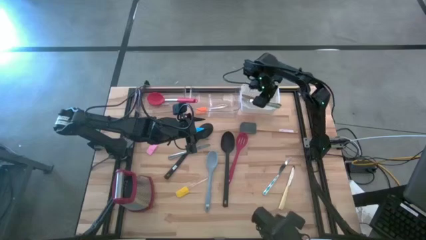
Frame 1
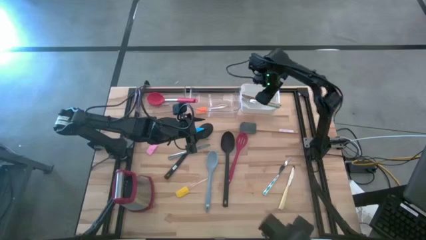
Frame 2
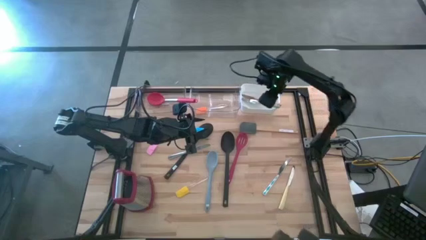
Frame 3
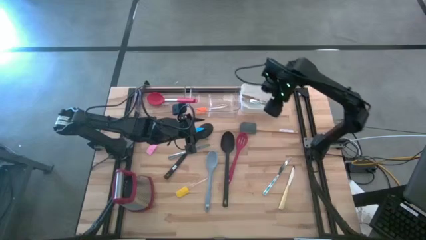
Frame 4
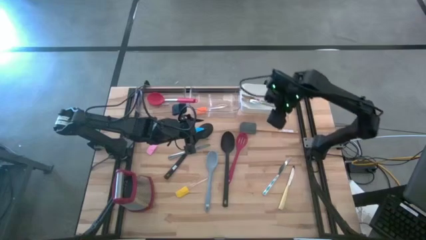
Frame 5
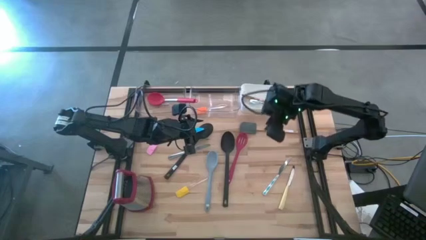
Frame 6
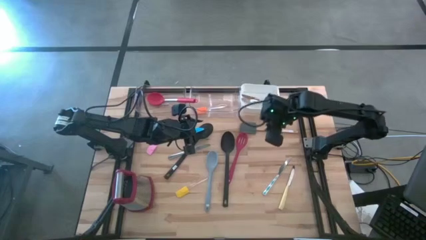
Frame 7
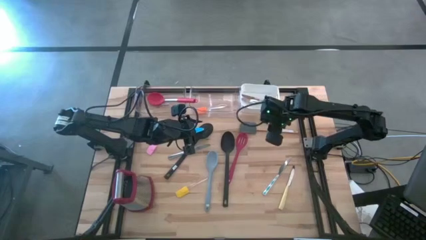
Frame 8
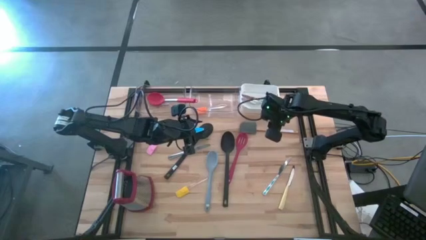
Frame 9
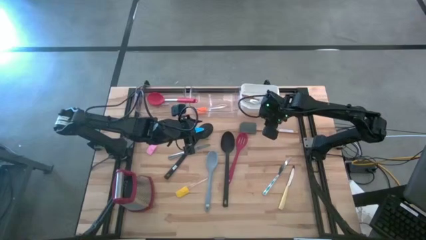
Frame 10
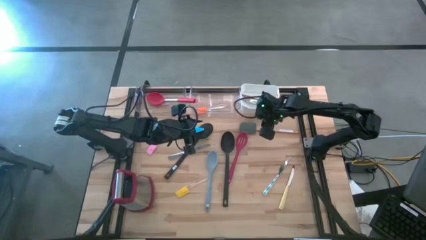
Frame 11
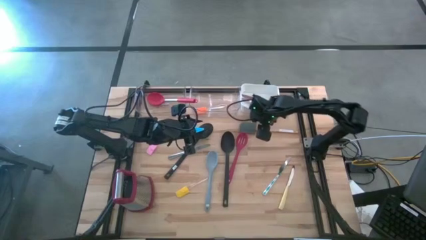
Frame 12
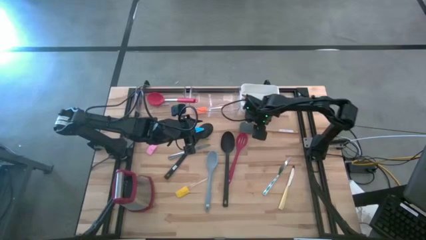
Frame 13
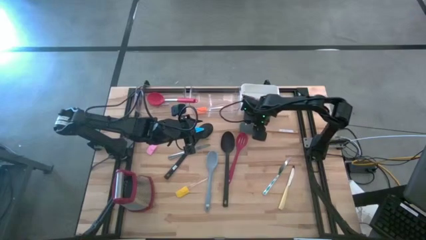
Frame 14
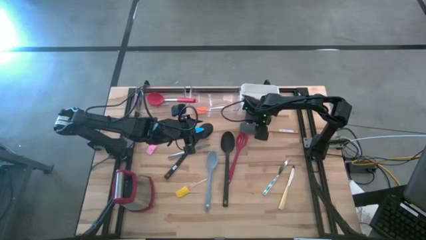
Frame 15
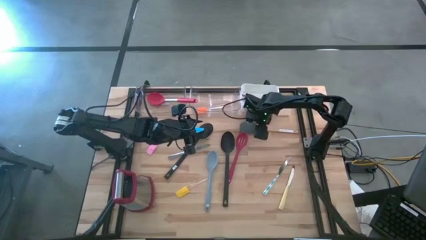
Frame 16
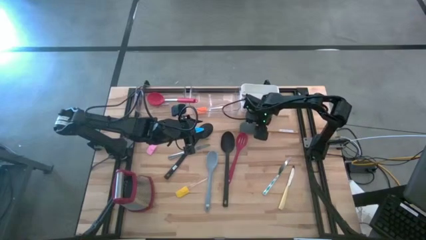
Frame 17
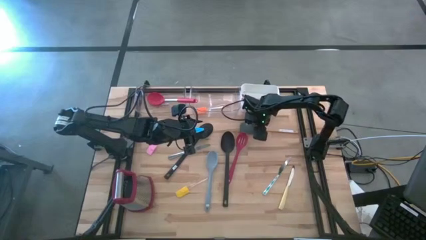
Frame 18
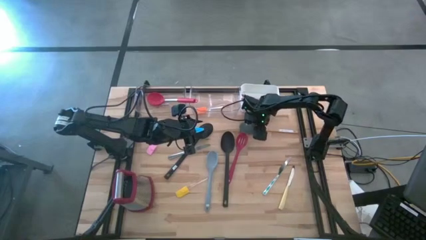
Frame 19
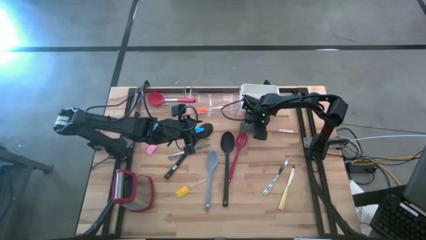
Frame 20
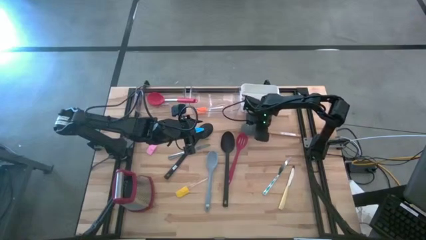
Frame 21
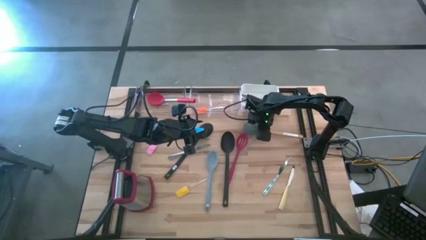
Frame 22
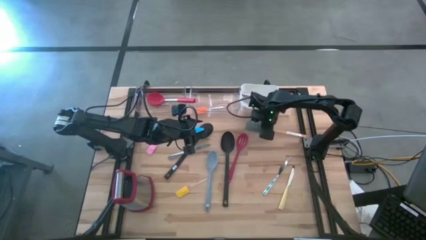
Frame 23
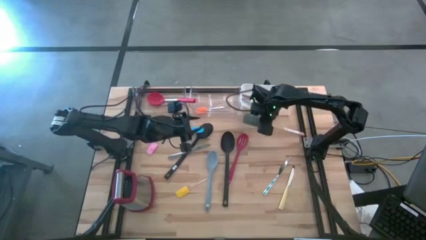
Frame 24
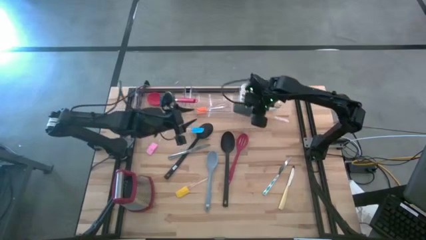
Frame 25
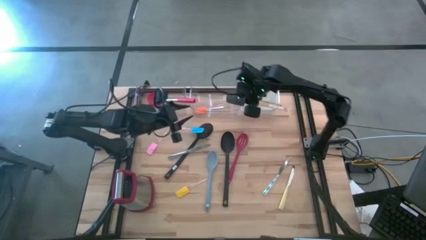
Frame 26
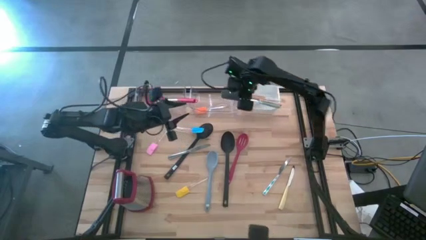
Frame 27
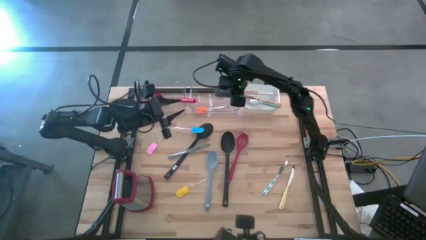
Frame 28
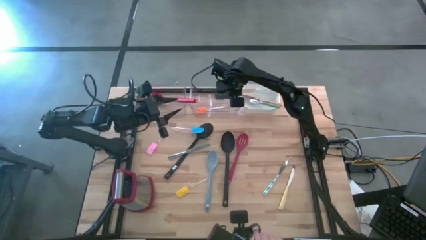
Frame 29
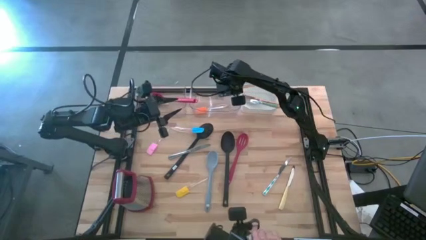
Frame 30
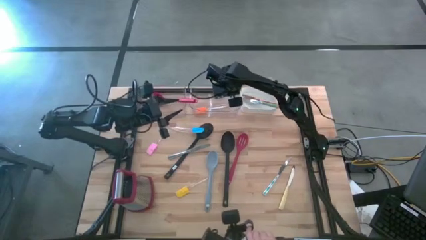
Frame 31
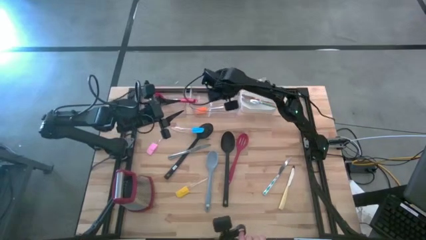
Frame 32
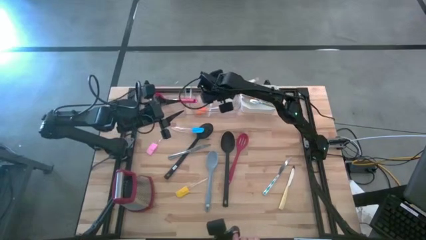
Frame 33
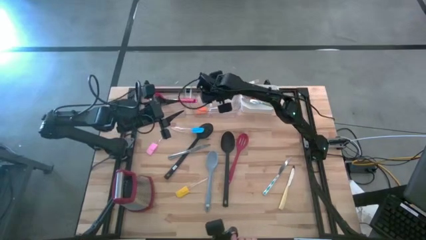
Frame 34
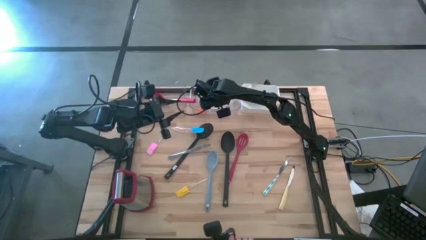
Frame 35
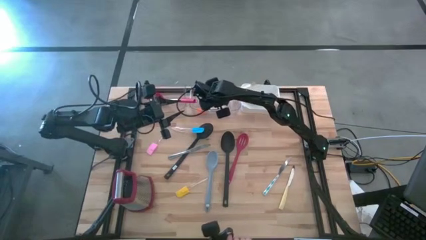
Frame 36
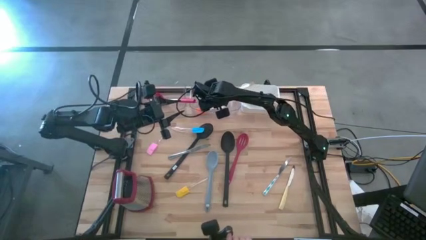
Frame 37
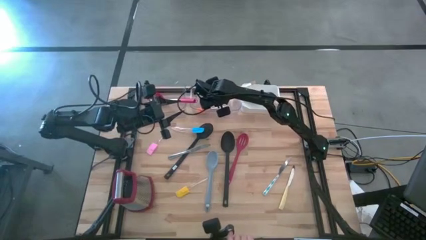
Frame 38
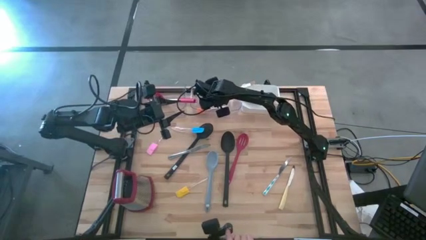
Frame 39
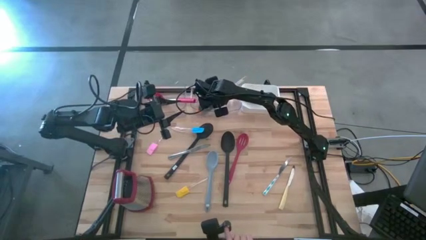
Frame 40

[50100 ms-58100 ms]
Task: Pick & Place Kitchen Items
Put the gray spatula into the right transparent bin

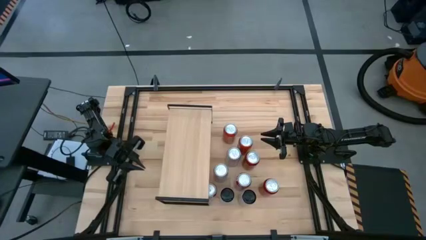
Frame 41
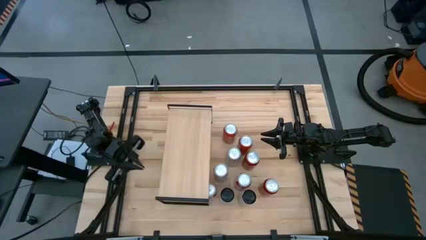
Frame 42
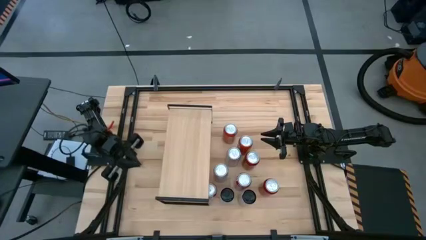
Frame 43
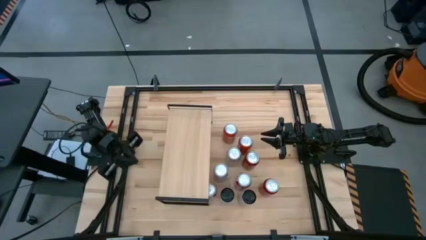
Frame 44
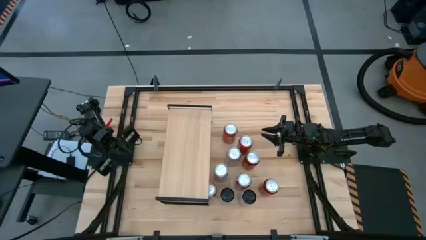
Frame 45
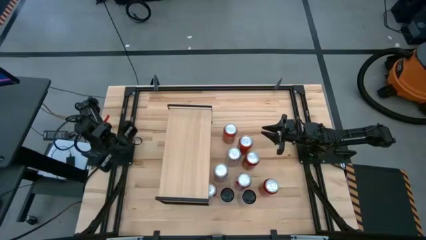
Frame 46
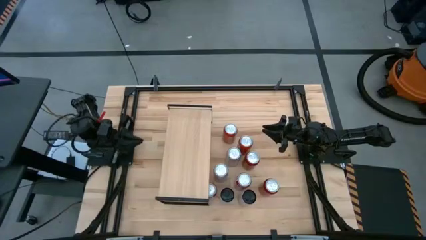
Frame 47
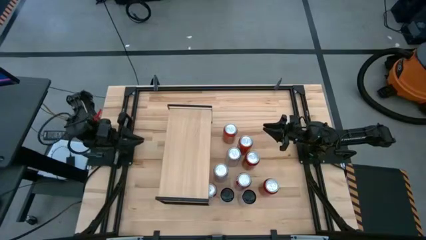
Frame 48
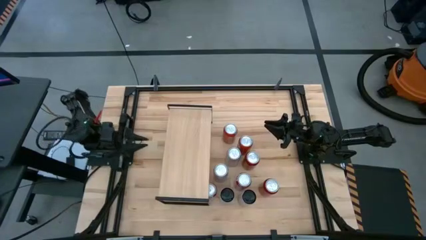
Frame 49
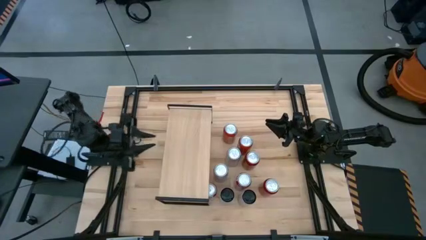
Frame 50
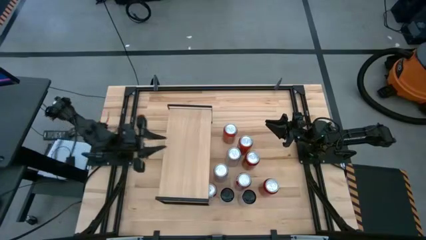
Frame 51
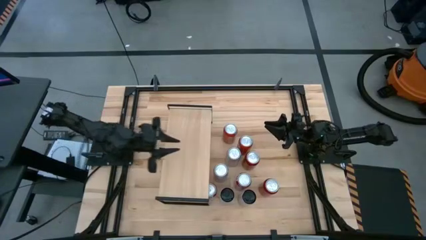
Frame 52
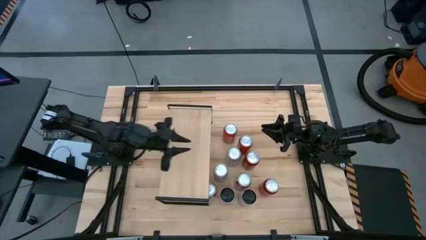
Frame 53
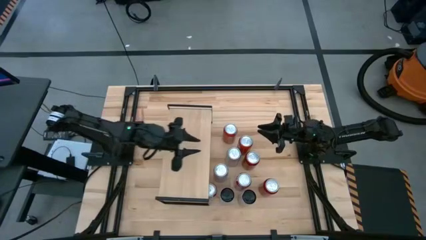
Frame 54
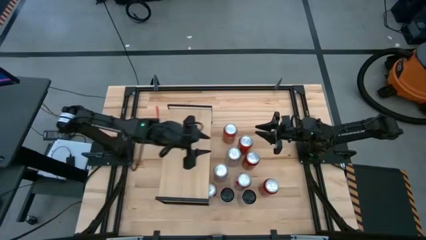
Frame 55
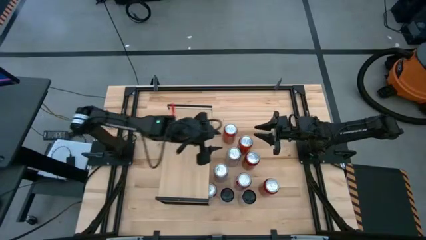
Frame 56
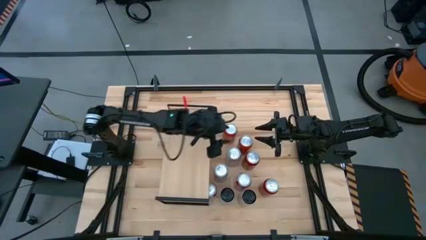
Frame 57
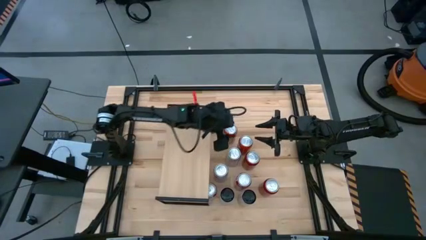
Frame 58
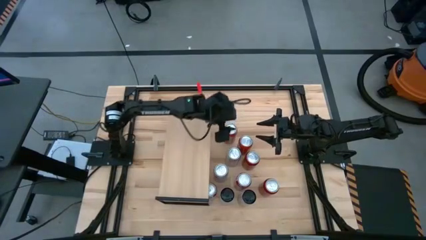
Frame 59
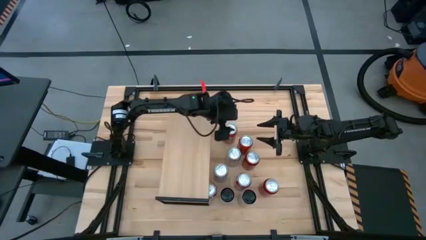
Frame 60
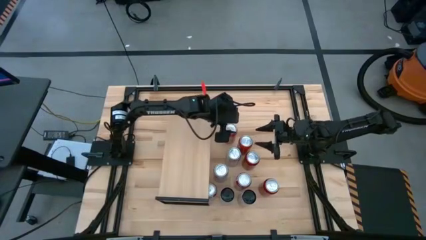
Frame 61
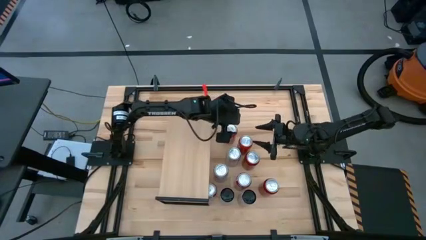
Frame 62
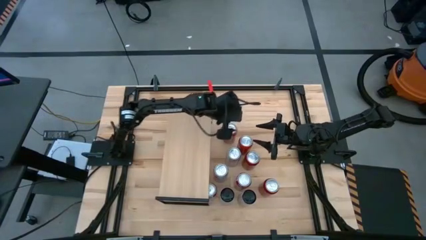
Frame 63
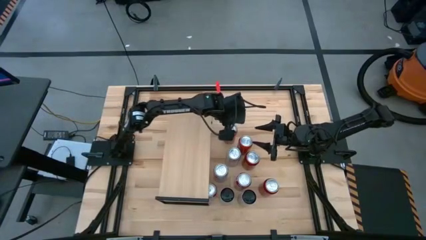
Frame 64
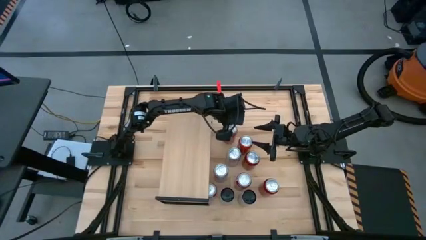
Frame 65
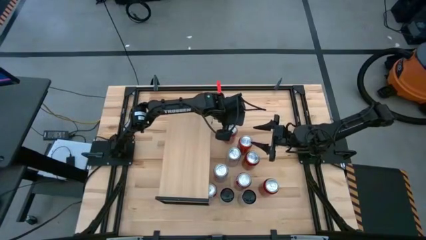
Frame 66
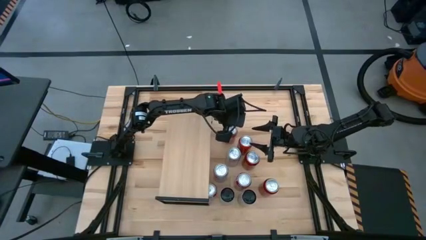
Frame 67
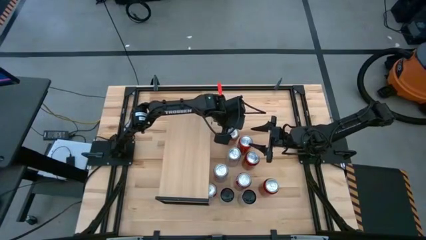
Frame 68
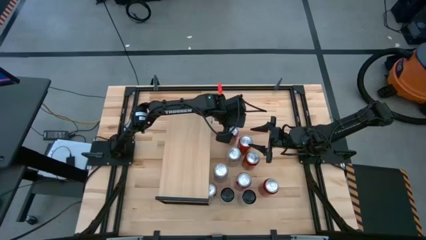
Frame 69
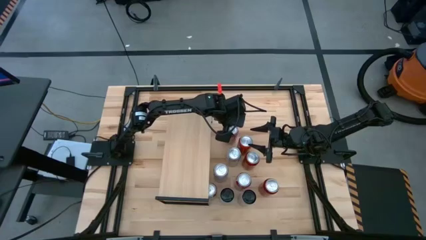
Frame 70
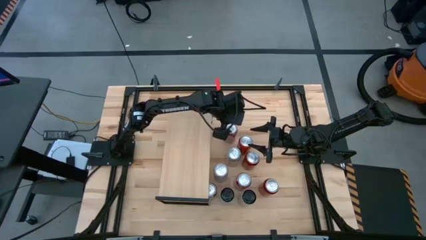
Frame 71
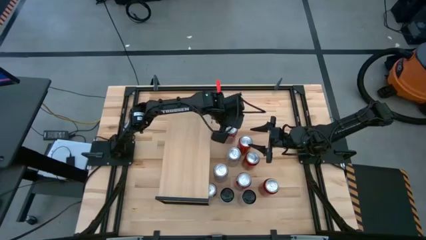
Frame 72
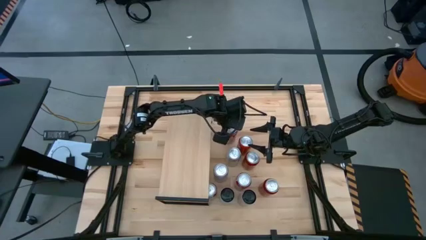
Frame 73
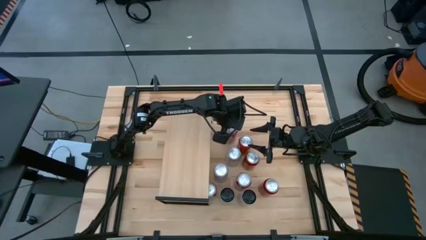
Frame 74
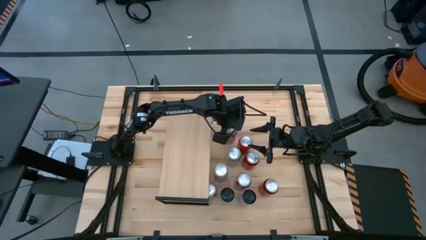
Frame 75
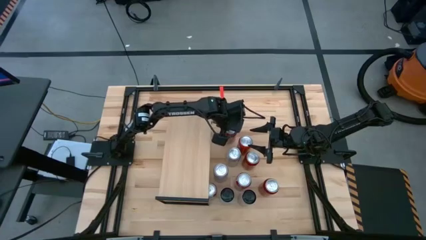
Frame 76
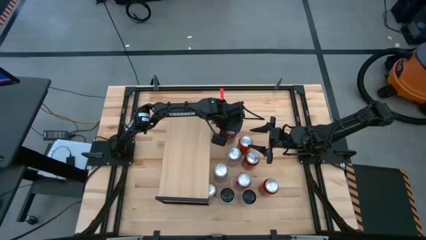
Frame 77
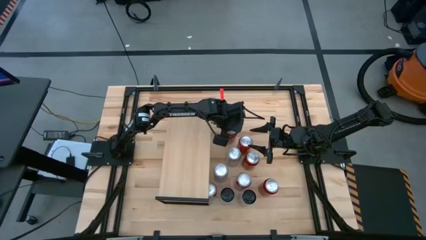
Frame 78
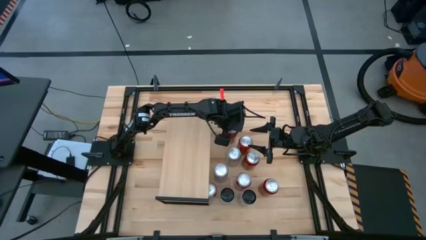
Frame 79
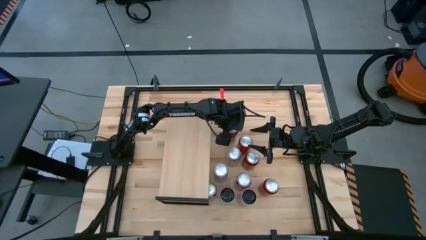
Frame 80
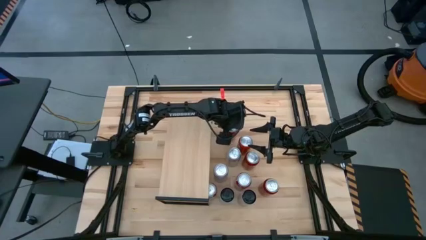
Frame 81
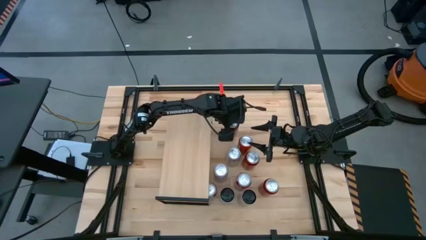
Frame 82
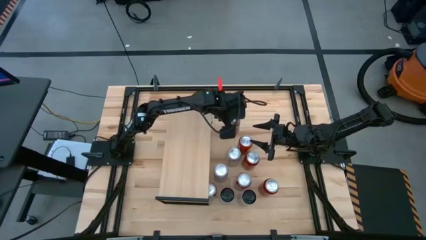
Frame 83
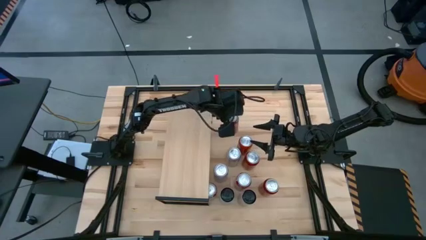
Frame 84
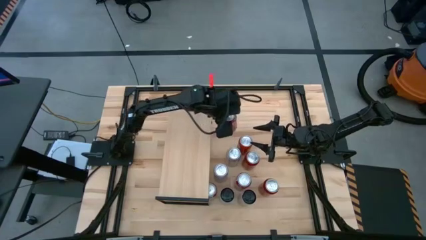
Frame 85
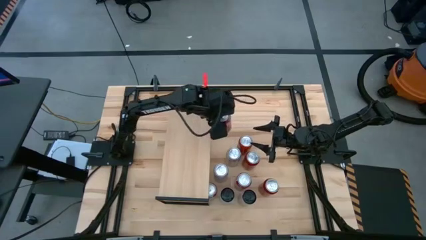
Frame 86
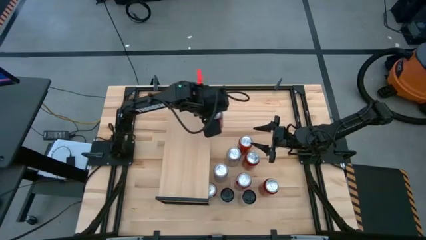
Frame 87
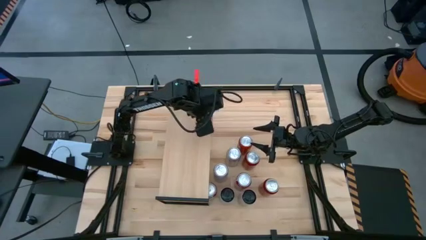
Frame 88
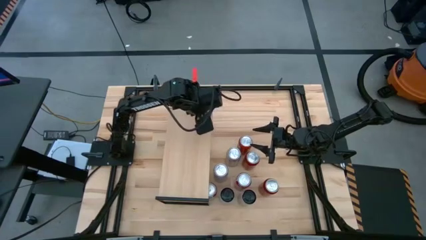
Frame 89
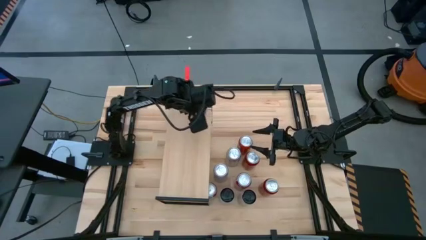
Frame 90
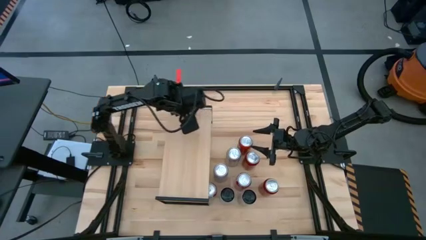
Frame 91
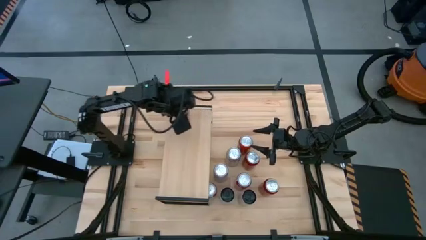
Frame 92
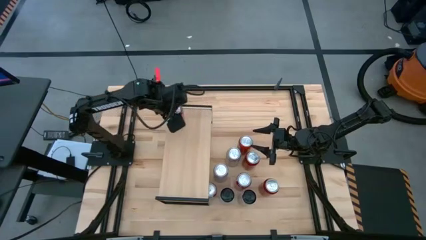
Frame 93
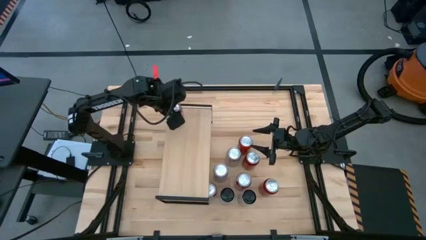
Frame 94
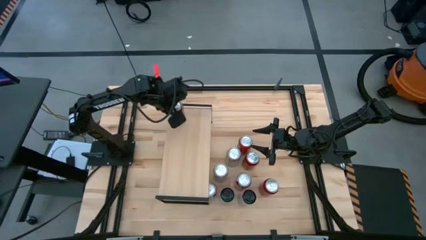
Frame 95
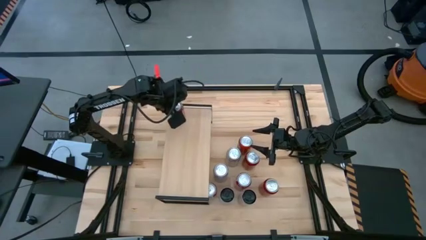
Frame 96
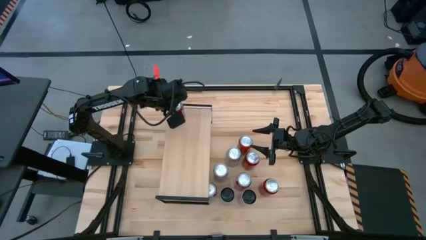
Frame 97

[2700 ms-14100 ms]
Task: Place canned beverage on shelf
Put the top orange soda can on the shelf
